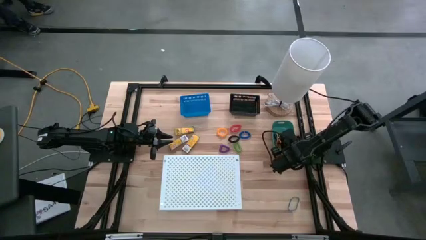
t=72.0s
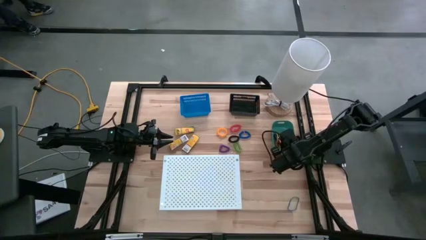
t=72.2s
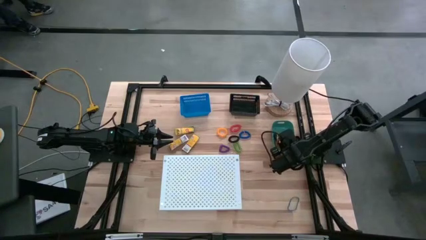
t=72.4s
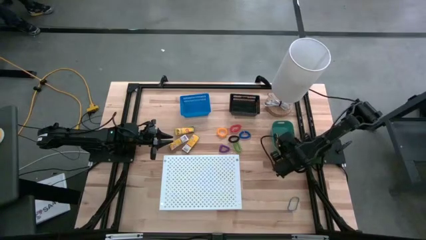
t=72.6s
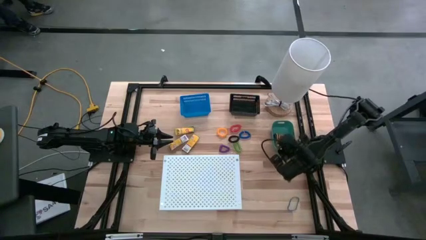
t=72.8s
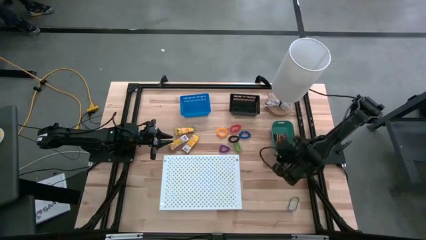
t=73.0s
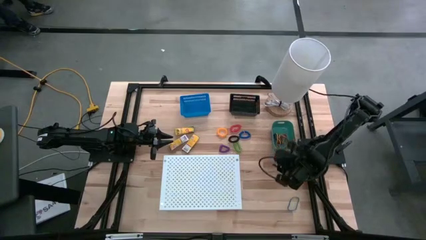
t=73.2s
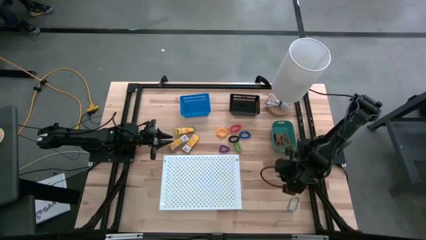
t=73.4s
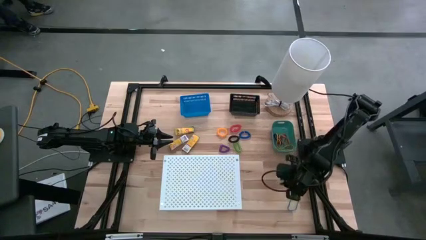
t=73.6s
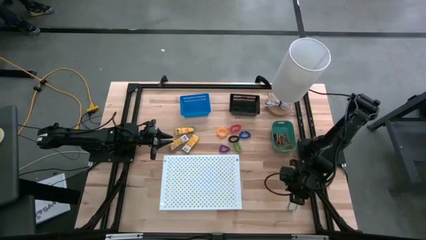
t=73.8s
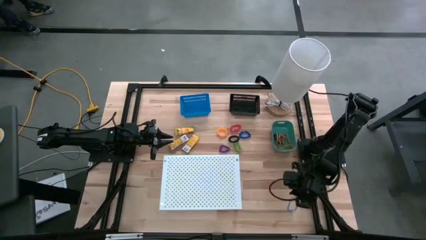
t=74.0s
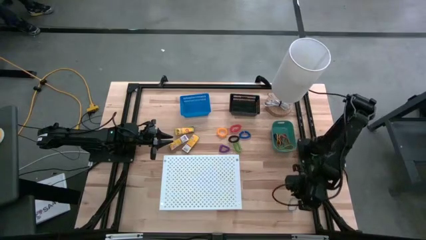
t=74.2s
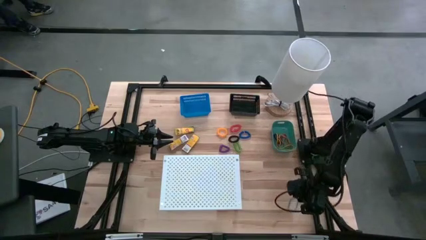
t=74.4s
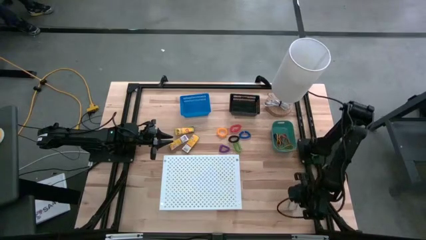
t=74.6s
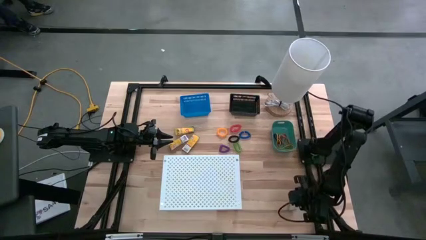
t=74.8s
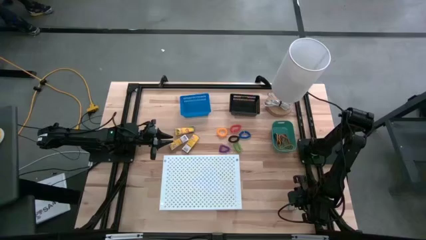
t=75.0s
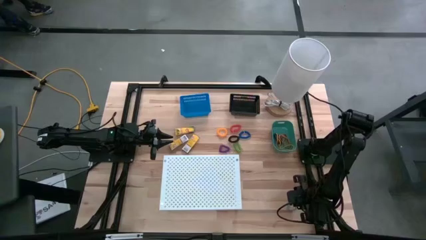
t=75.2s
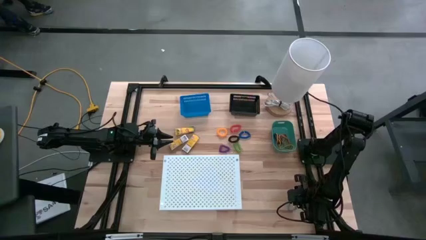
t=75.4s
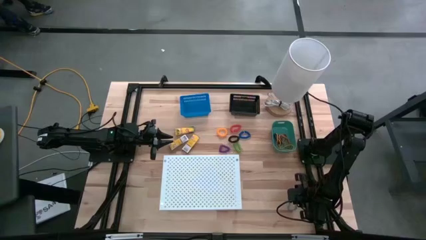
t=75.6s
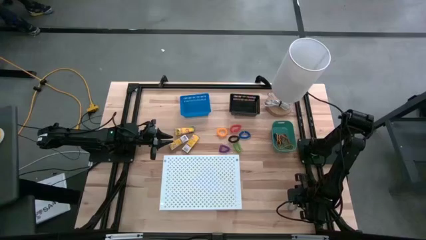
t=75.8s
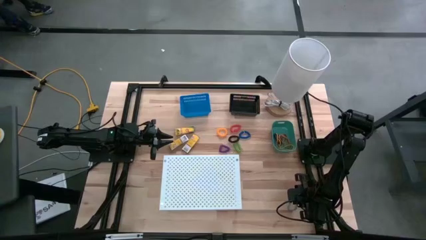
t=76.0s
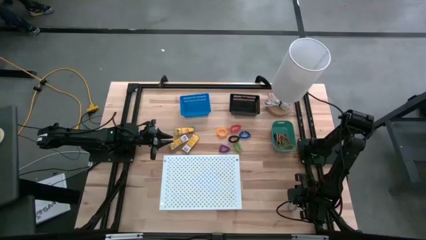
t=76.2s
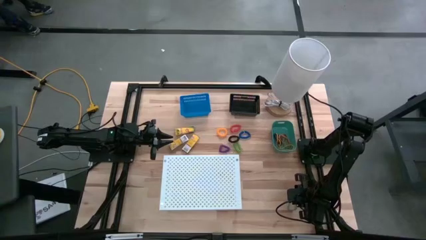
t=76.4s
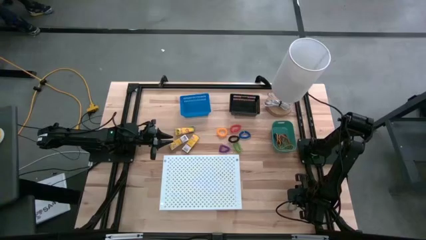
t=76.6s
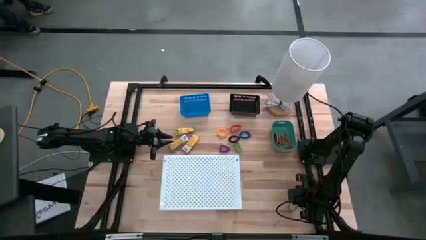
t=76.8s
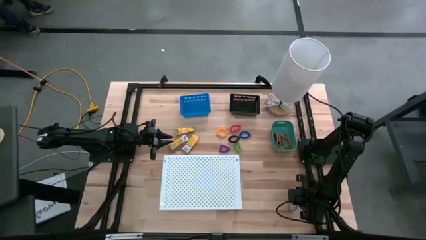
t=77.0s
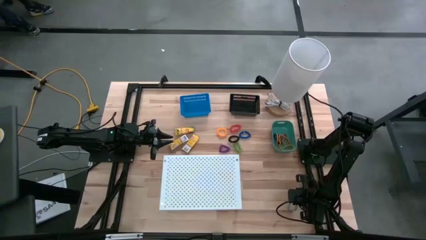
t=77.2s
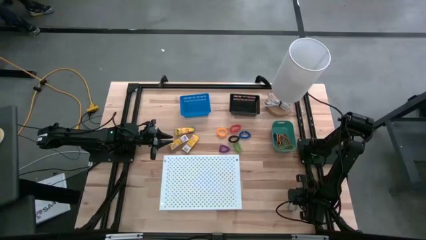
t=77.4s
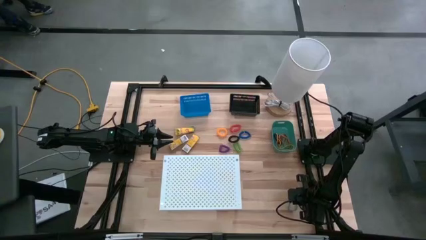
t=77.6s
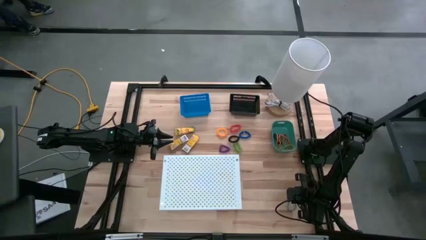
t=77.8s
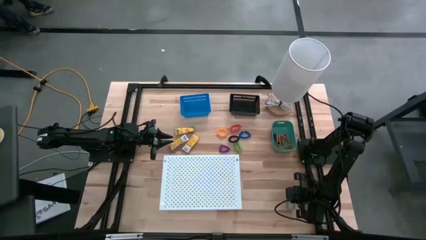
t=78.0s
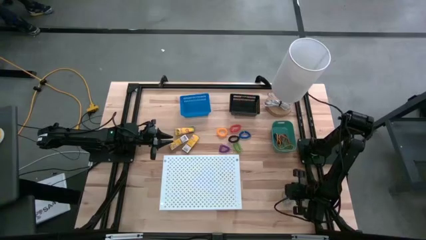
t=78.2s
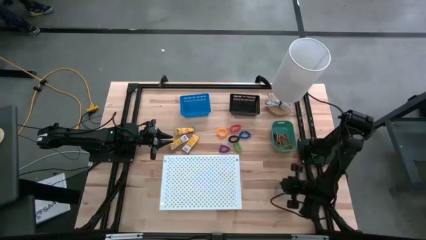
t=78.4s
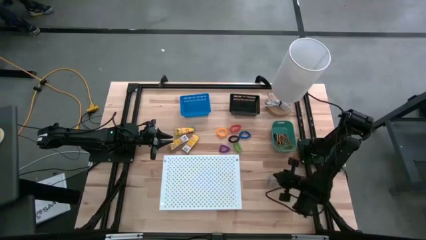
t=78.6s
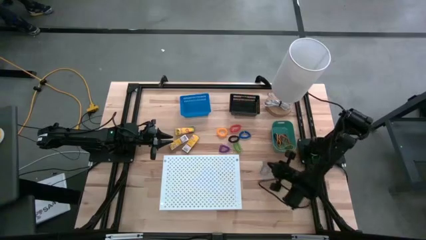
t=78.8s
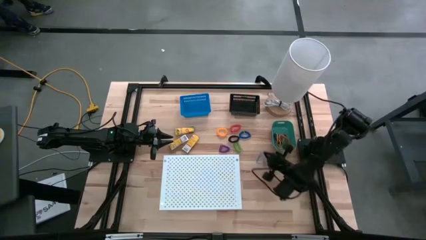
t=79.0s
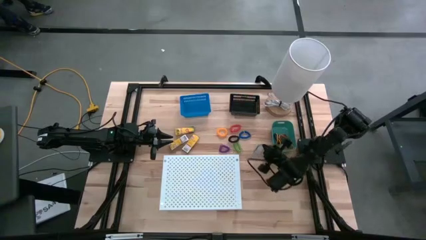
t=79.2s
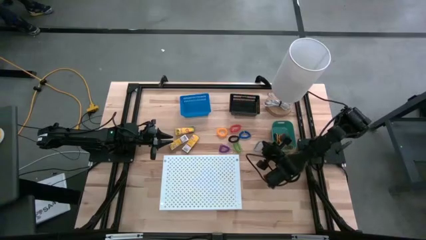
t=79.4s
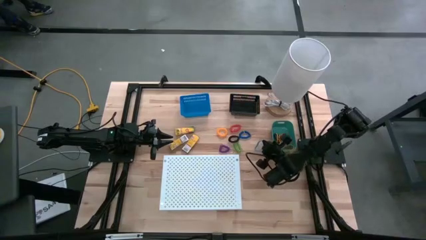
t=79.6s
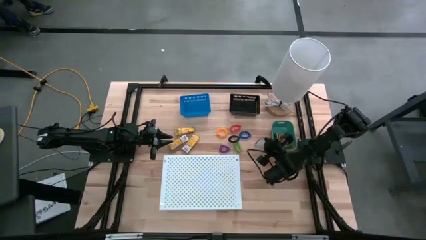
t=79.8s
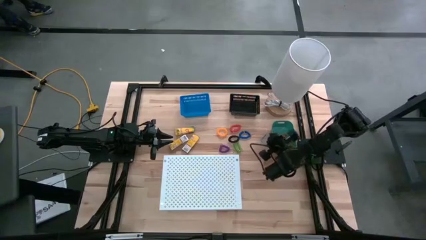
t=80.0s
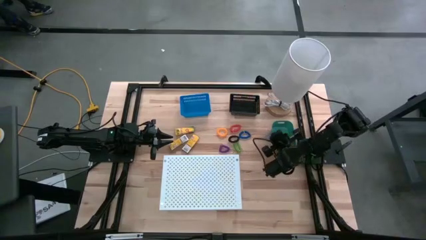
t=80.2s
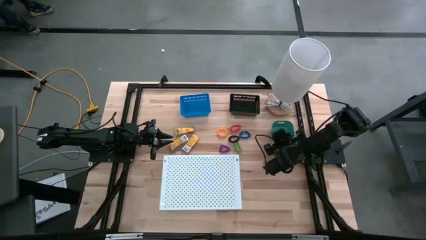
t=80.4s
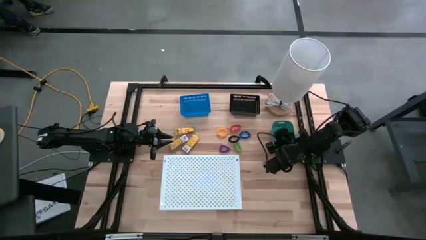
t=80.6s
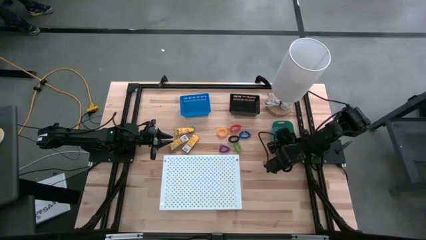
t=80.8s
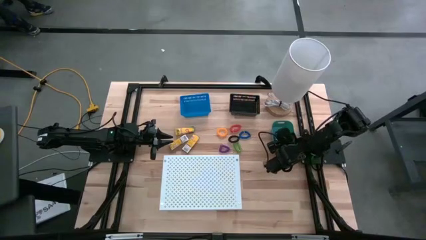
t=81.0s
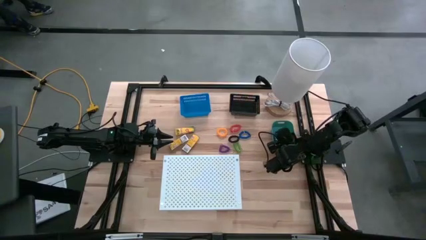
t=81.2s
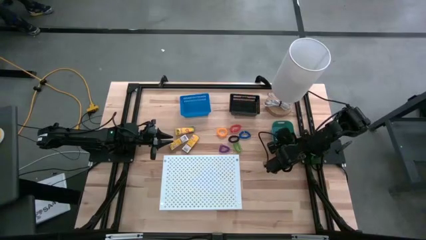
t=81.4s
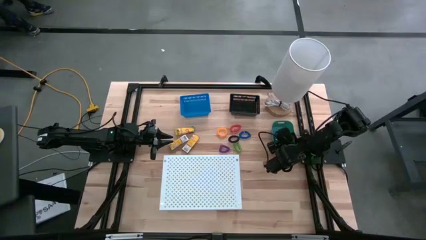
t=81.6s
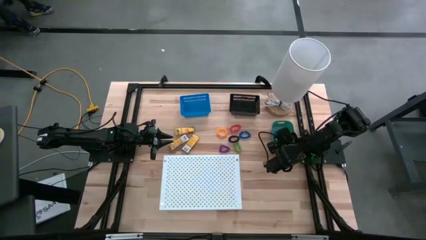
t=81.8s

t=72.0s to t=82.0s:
Task: Pick & Place Office Desk Supplies
Put the blue rubber band into the green bin
